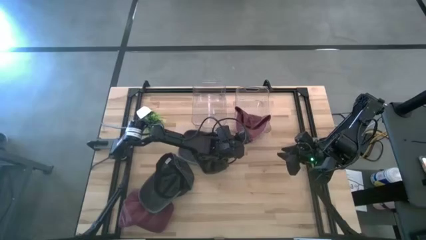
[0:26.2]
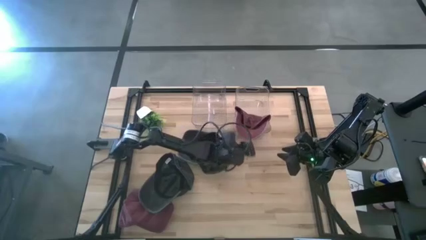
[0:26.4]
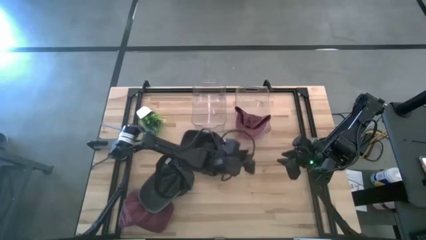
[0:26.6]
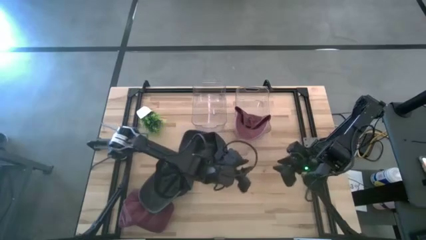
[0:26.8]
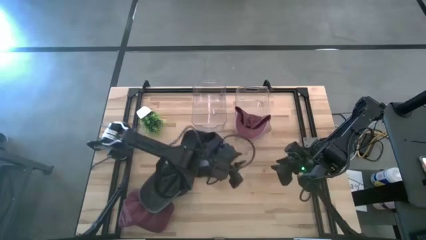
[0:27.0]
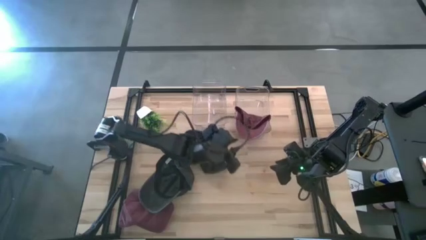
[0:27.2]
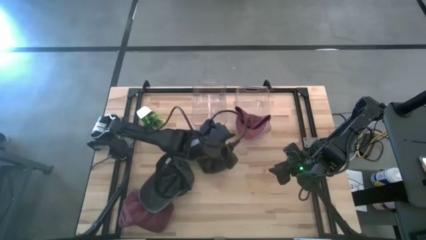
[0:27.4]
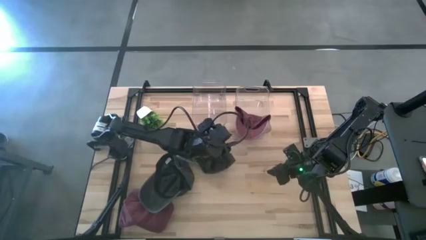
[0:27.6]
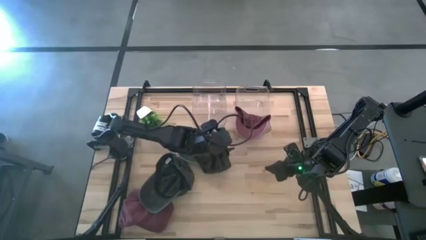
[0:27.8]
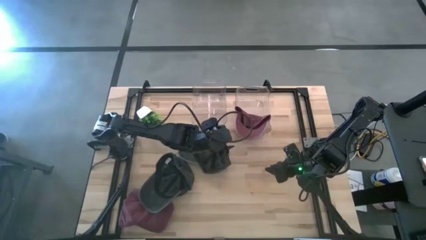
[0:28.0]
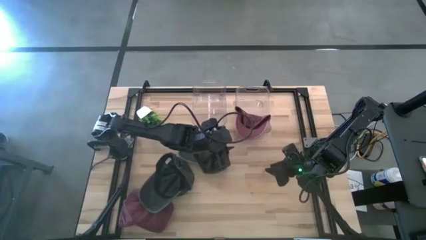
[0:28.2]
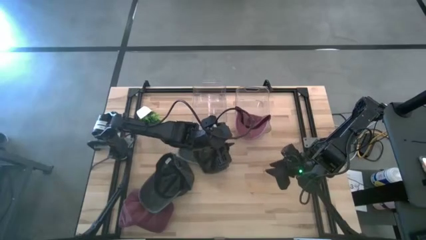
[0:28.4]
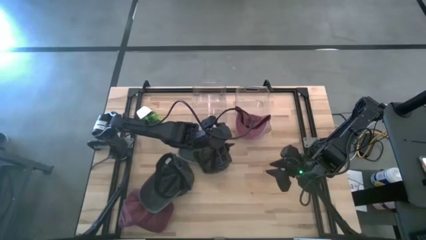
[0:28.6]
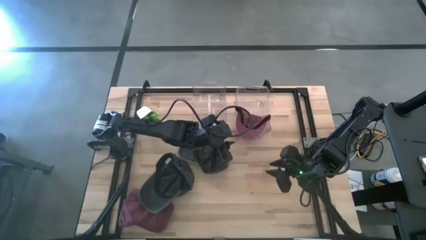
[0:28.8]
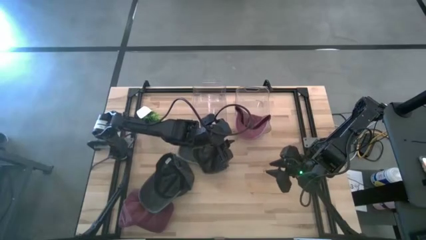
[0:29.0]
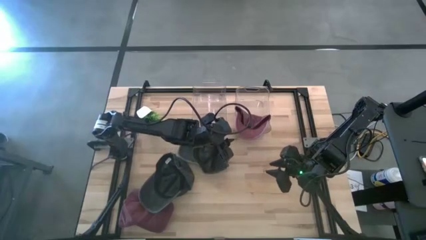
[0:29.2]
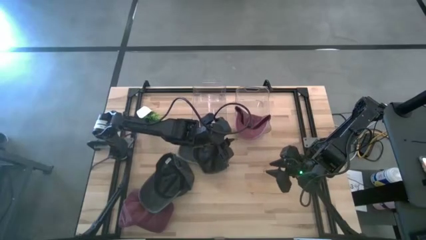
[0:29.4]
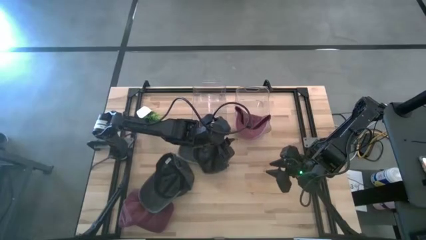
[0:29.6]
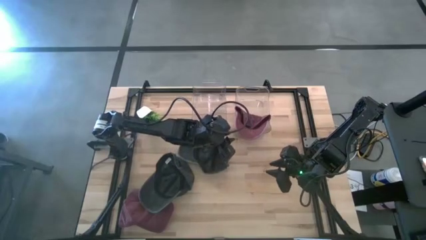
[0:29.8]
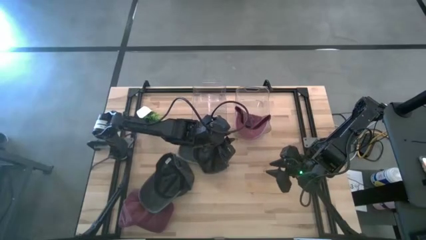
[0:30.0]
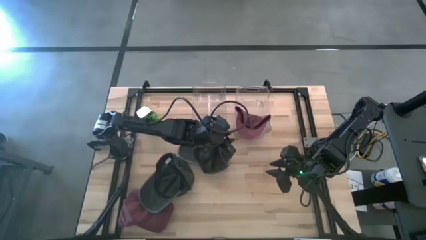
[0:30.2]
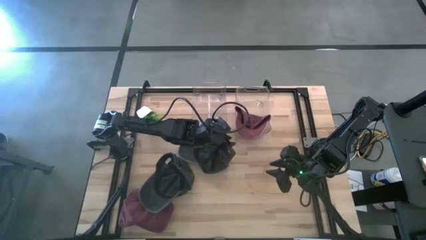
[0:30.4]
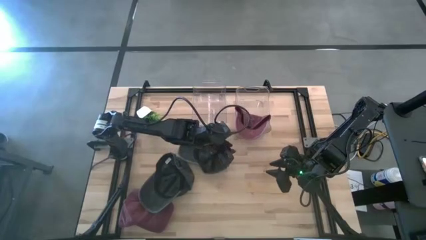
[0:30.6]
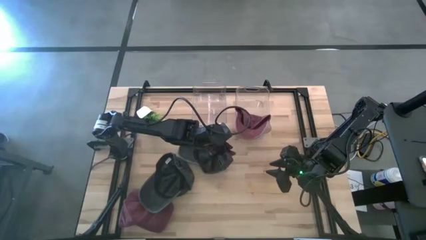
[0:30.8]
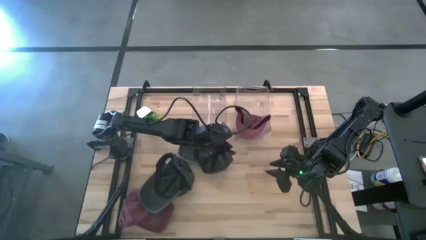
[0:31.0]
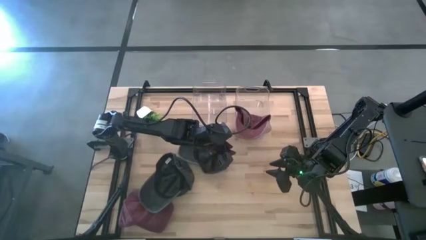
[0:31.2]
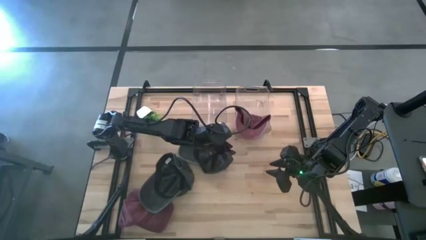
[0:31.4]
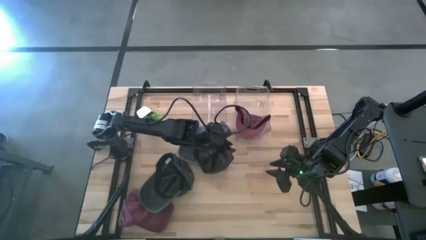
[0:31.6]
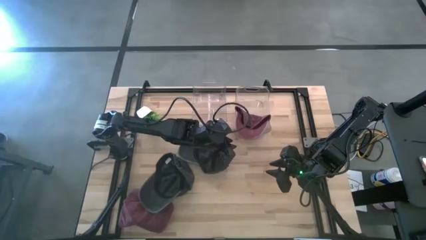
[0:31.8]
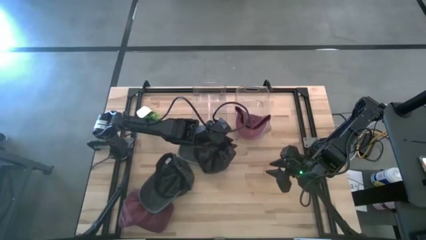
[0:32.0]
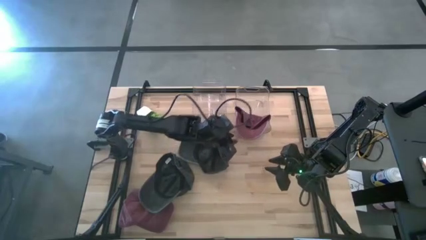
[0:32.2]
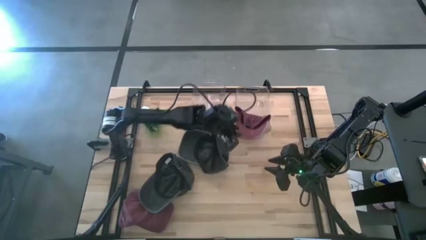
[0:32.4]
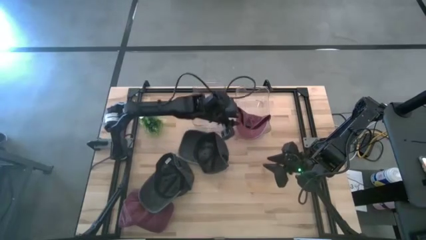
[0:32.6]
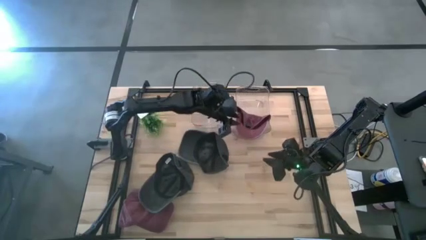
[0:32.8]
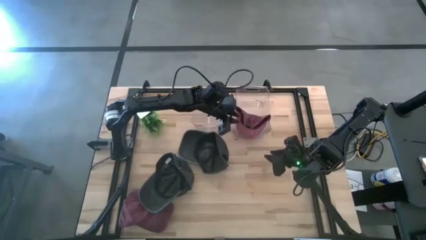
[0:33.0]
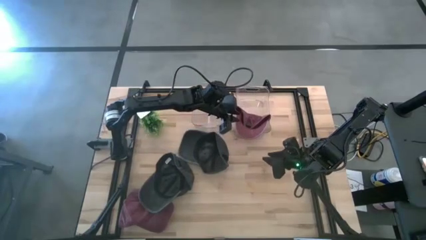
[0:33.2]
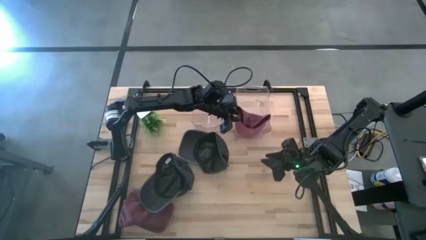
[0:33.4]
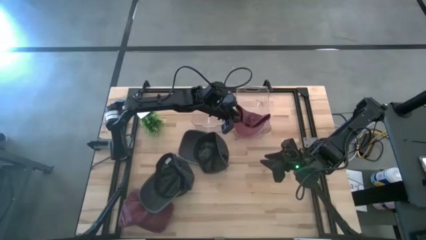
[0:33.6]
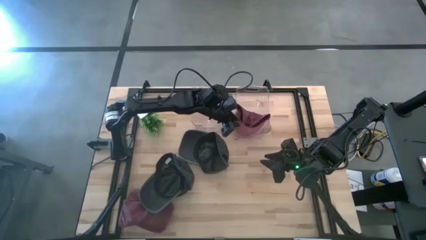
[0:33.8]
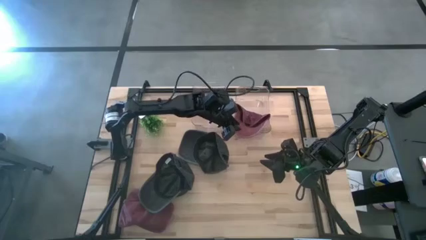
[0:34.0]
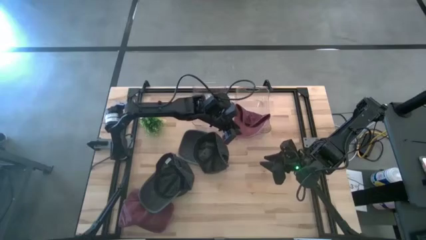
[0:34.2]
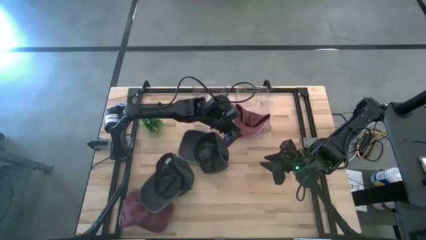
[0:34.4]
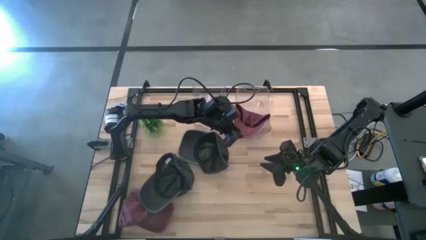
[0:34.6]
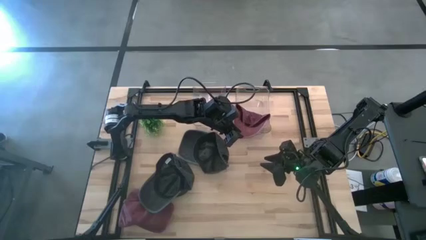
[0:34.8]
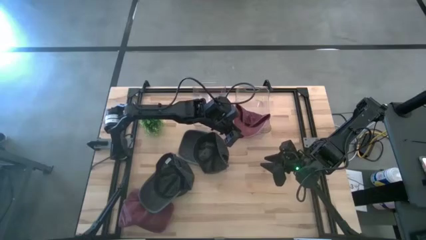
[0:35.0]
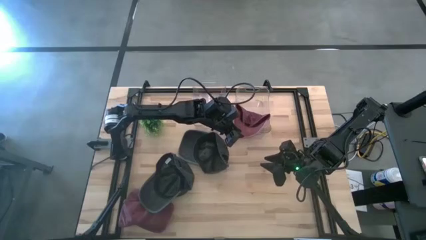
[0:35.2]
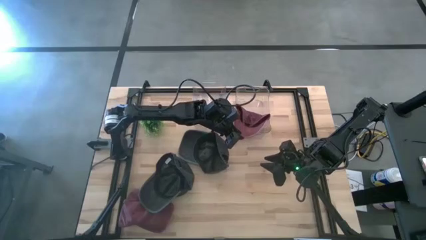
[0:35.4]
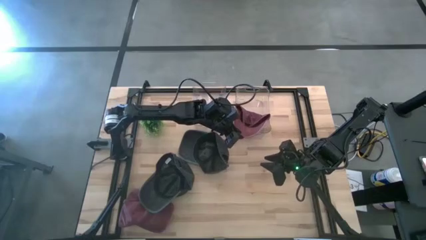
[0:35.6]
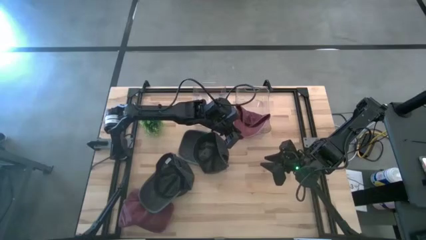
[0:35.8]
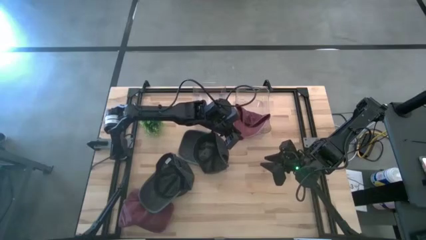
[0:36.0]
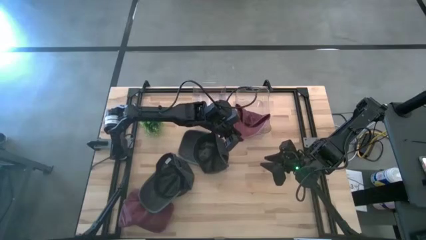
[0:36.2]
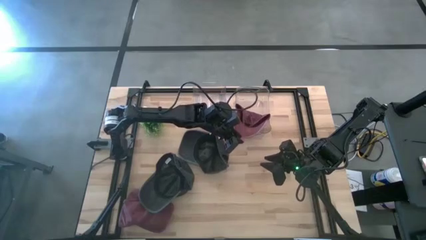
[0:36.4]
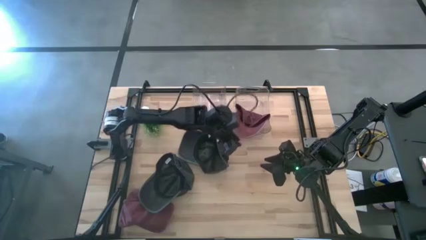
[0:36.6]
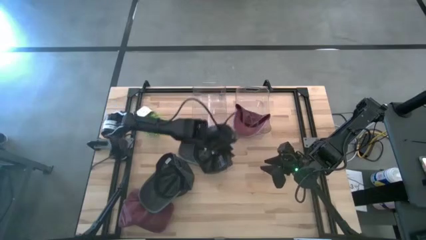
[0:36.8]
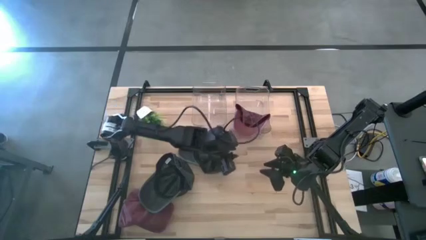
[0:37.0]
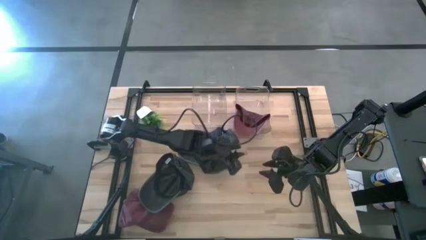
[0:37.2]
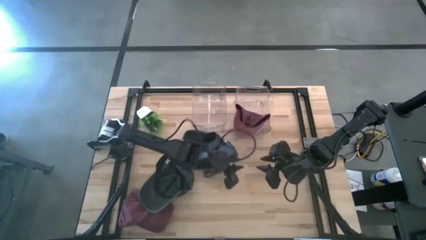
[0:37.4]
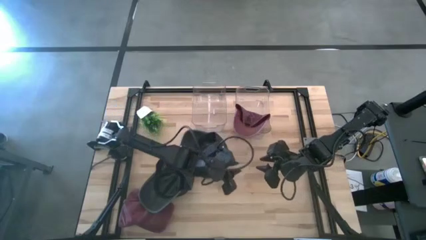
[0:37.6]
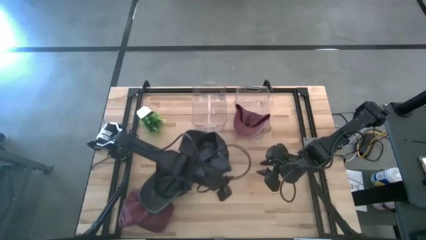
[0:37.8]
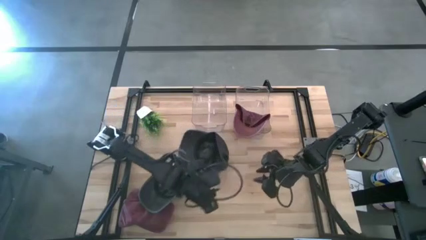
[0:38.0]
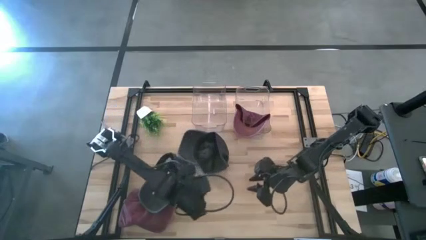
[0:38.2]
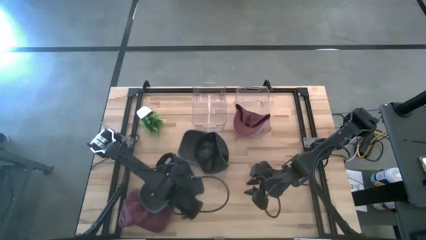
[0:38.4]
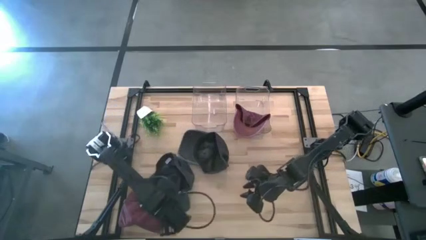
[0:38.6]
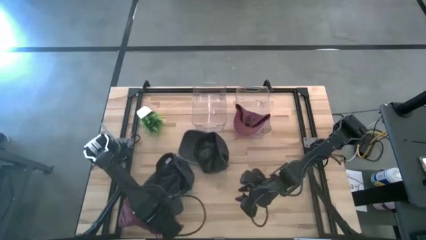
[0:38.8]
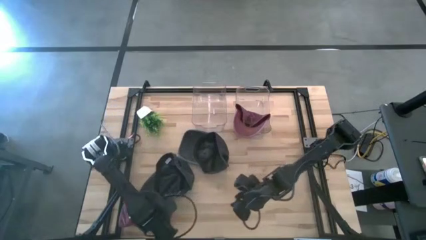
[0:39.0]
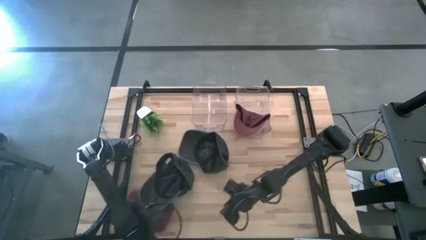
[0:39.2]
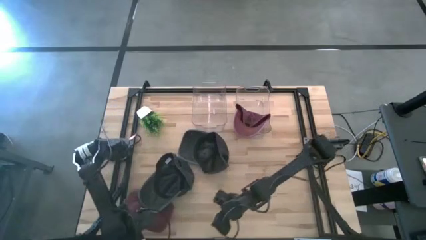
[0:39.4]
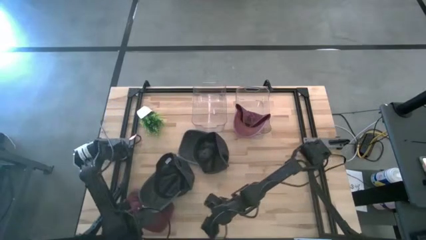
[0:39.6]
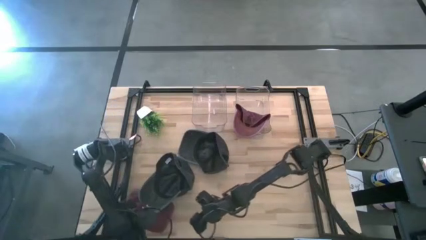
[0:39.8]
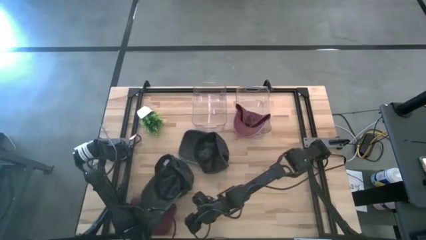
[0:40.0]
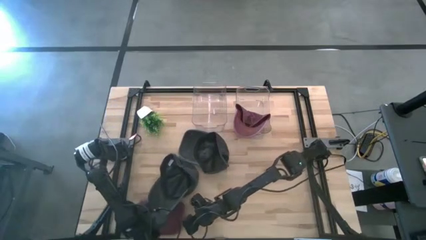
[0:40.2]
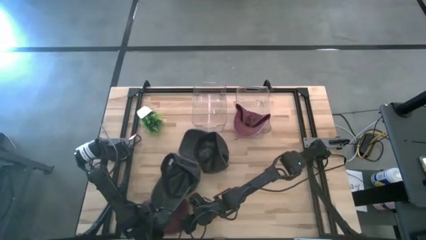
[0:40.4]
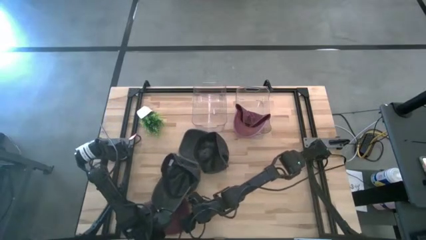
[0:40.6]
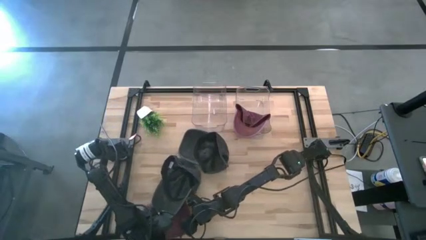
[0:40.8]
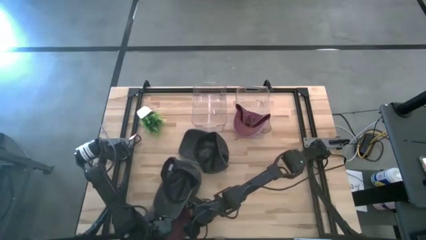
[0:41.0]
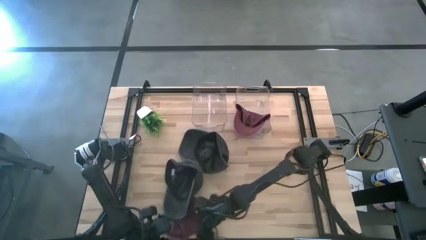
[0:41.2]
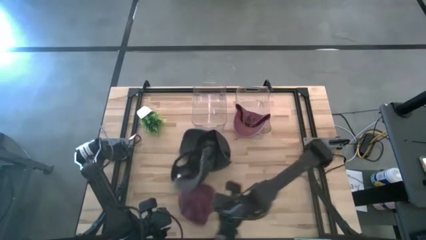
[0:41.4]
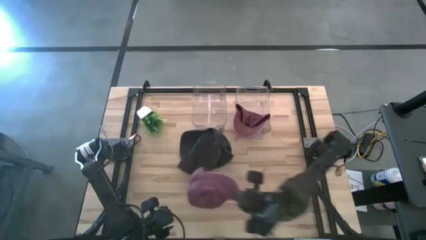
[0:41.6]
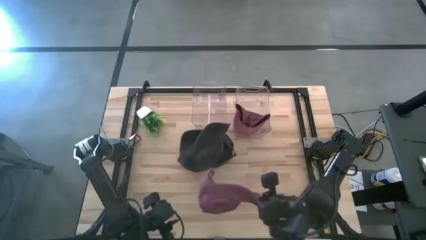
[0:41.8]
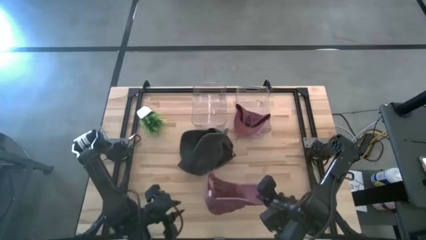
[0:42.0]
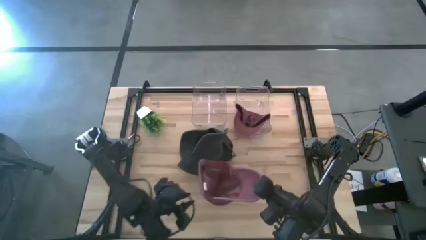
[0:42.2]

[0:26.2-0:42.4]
Task: Pick & Place hat
Put the red cap into the right transparent bin
